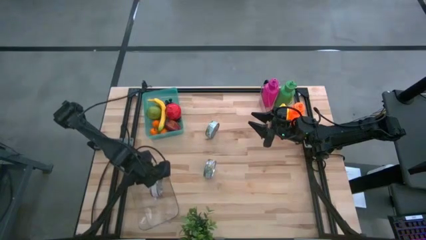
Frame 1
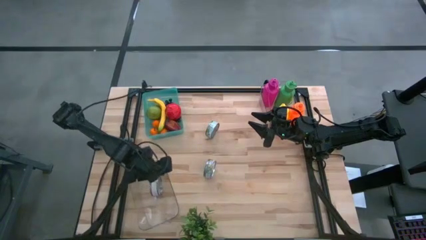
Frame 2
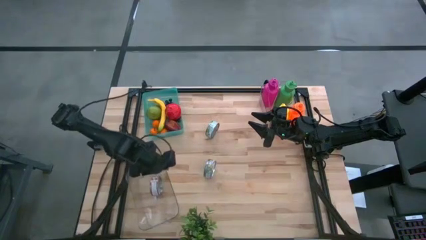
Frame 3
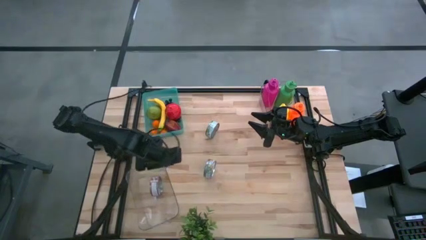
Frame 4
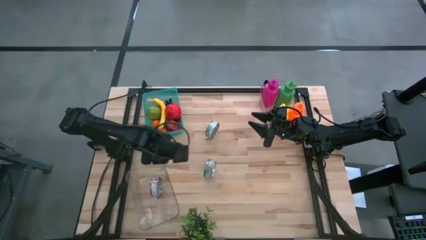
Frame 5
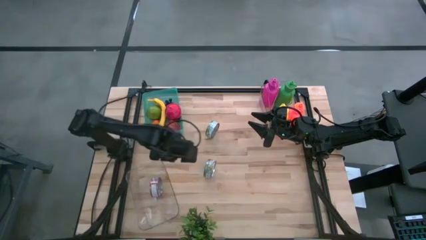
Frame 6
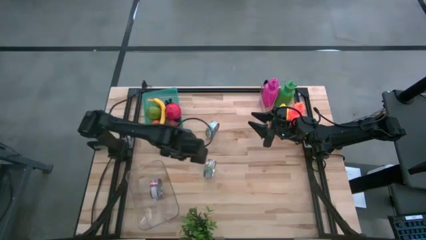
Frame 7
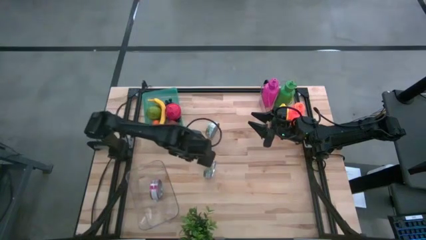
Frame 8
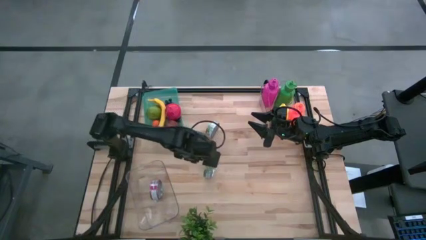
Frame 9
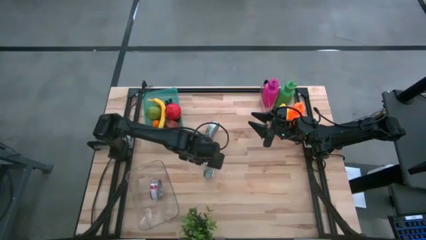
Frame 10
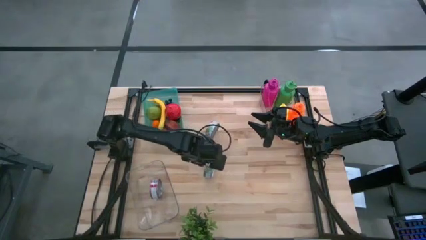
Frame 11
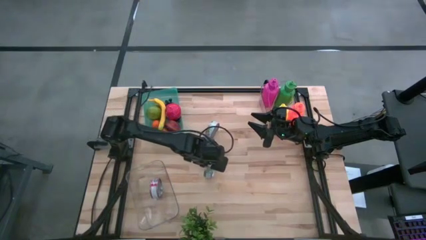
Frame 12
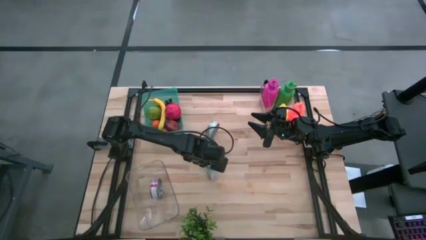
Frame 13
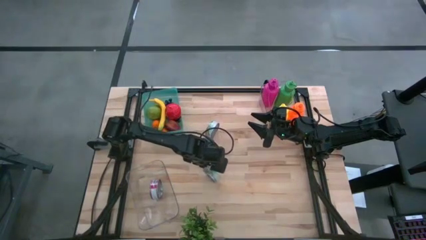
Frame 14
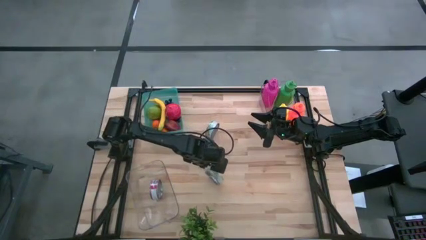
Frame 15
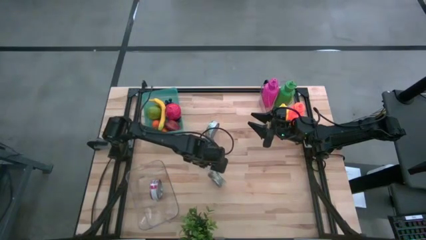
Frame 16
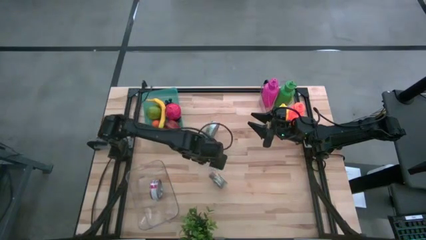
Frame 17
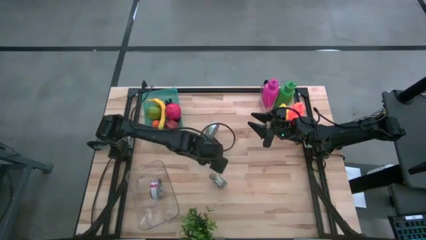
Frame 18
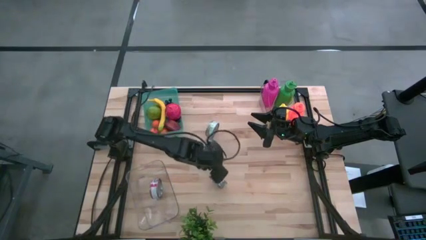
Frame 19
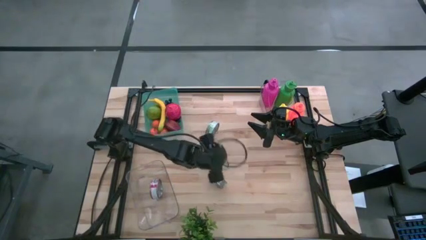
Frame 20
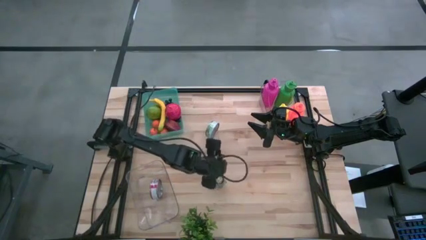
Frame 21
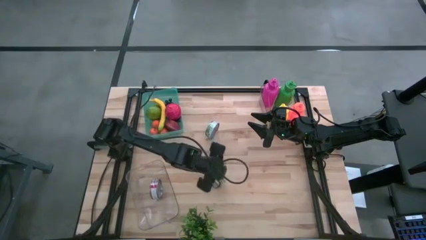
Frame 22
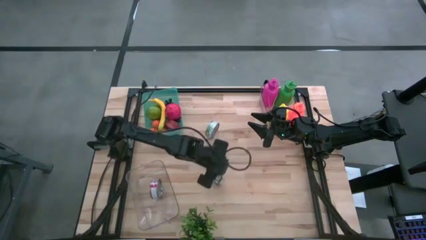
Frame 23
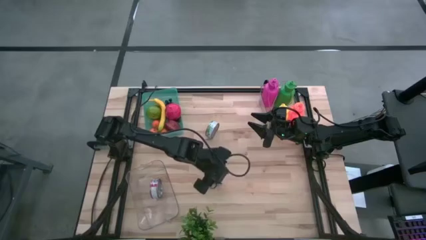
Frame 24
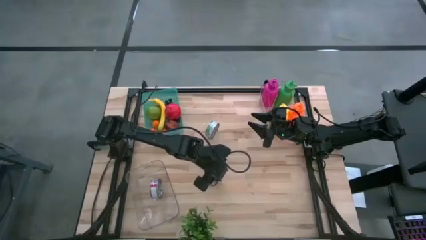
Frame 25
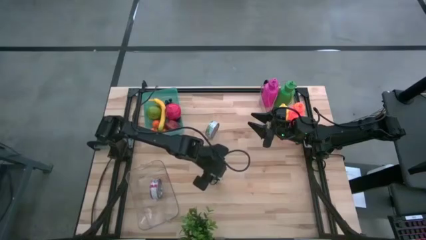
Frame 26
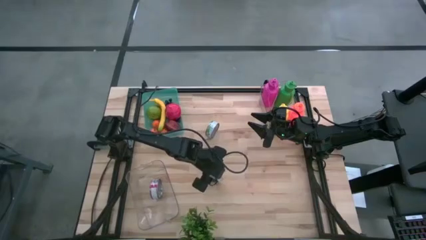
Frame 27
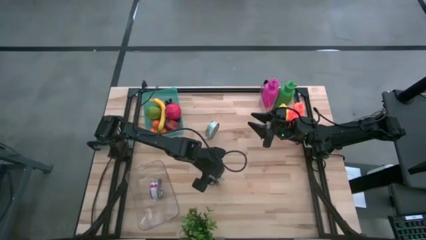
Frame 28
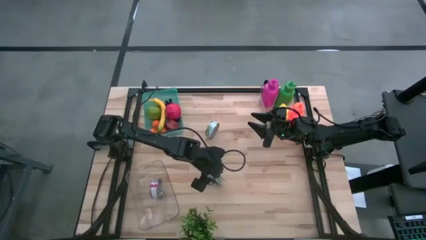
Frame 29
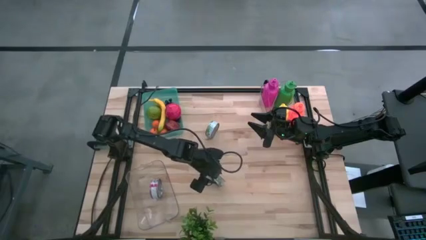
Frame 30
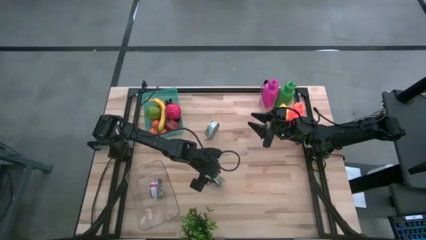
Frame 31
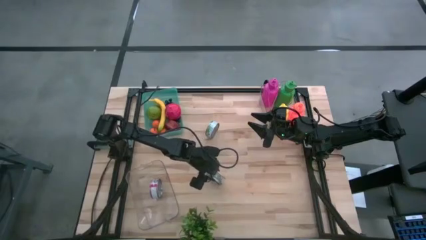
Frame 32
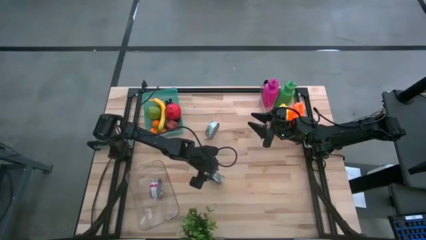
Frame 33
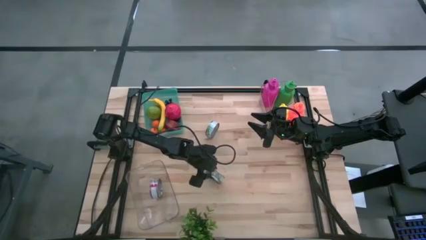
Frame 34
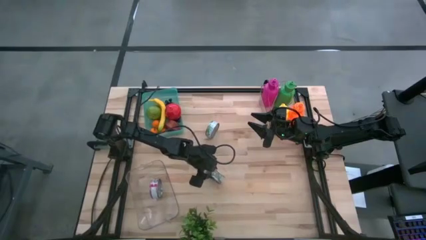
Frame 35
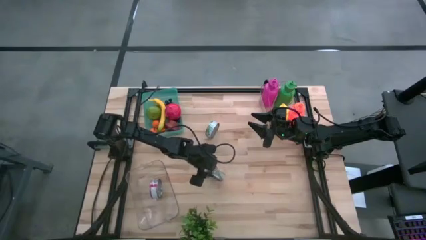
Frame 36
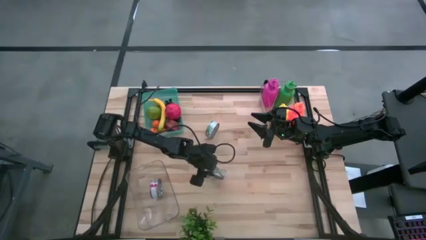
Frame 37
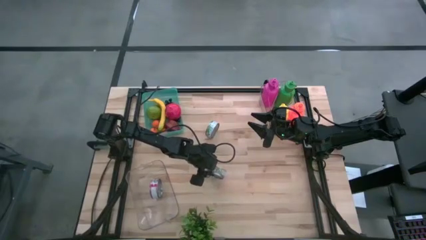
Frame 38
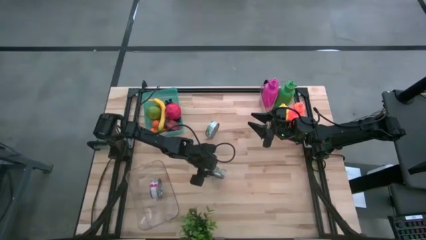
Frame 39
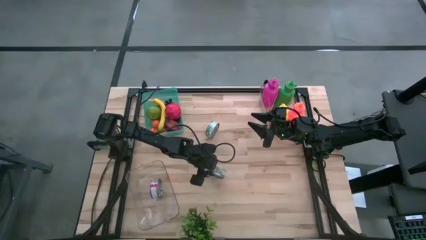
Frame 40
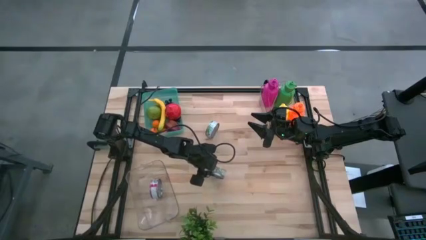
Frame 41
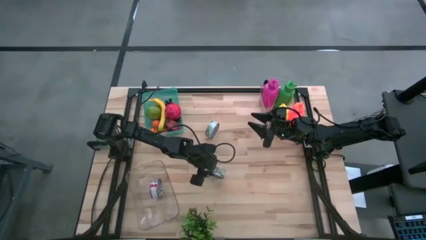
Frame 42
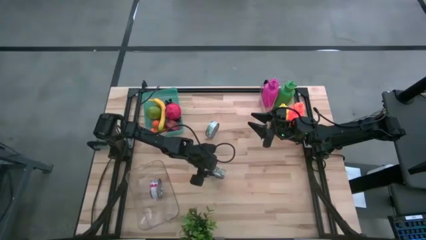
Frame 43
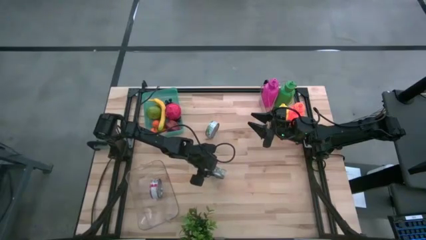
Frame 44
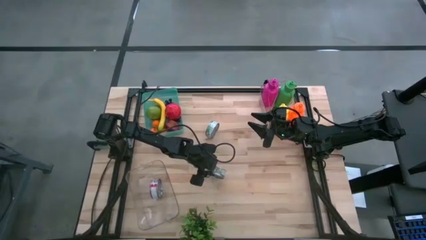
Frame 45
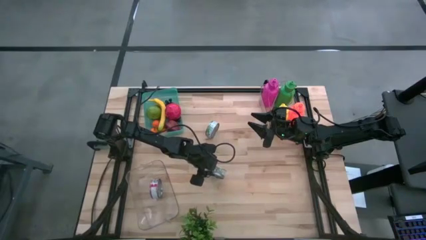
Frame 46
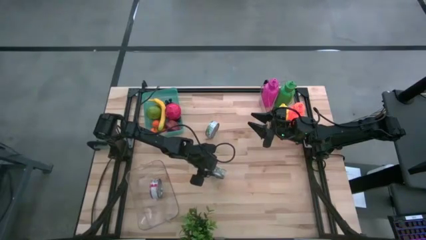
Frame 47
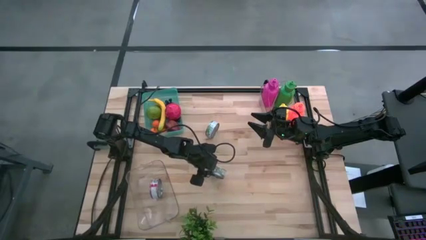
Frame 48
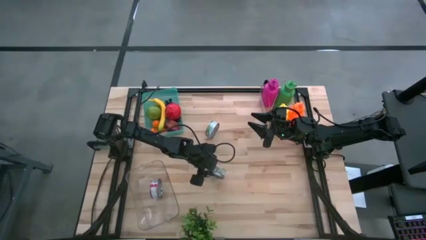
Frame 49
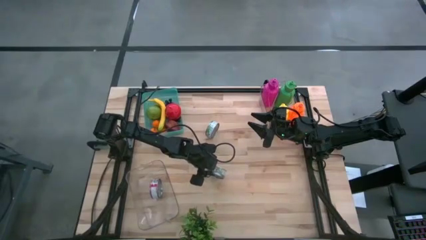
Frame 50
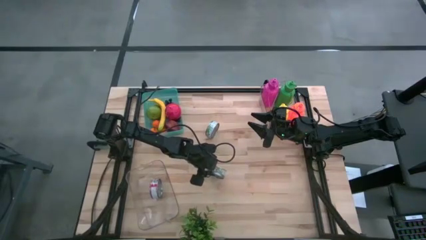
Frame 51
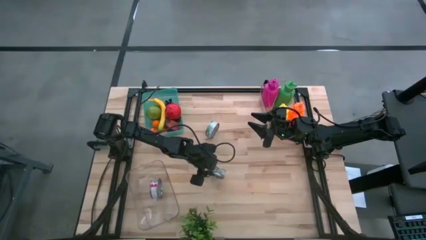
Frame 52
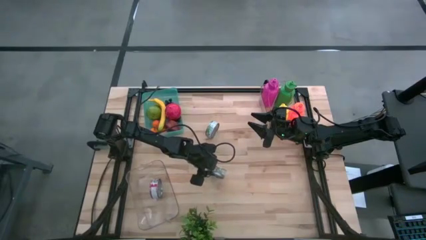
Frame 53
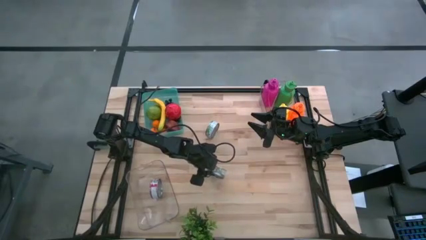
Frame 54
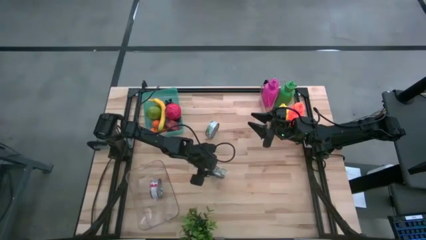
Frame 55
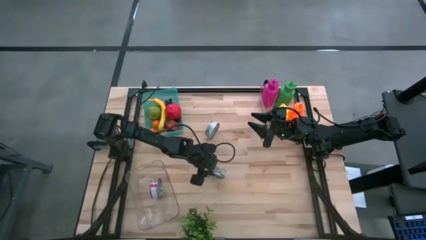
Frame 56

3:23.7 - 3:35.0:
Task: Pick & Place Food Item
Put the bottom green tuna can into the left transparent bin
